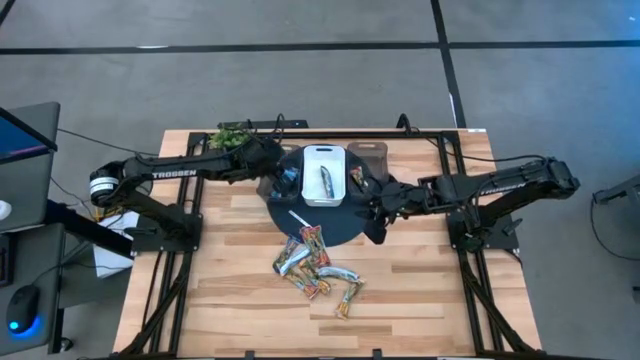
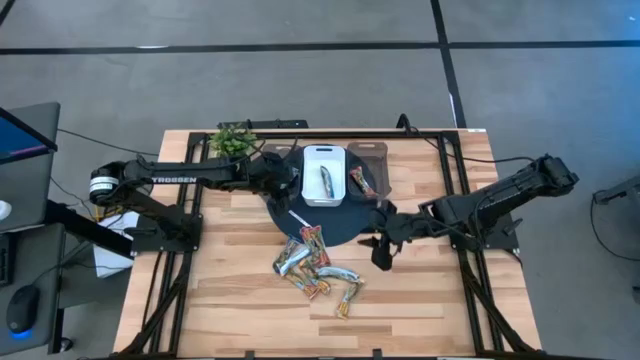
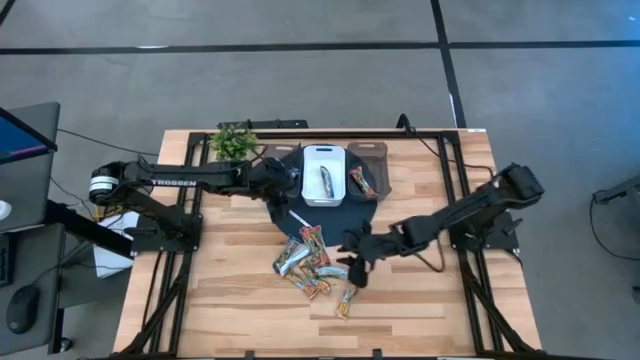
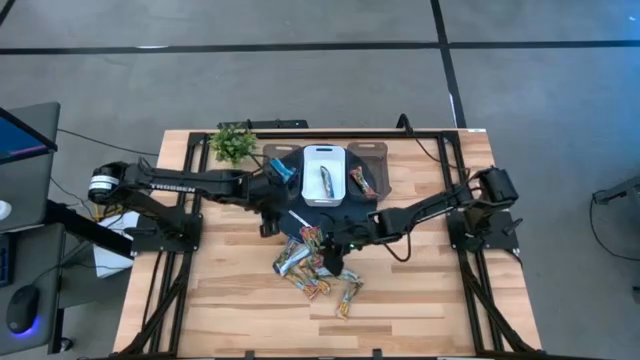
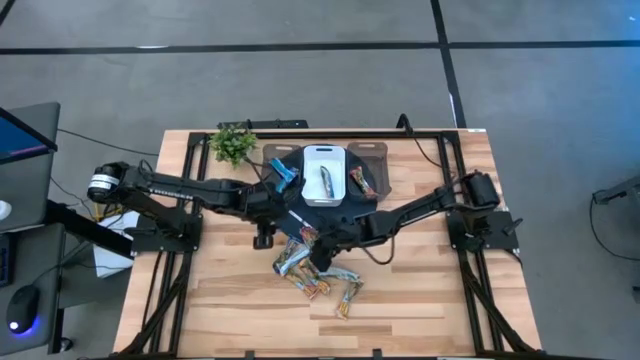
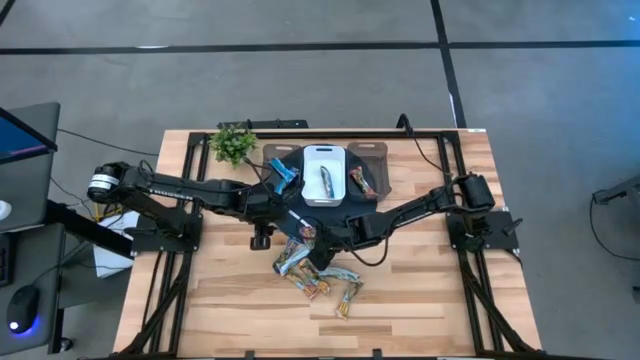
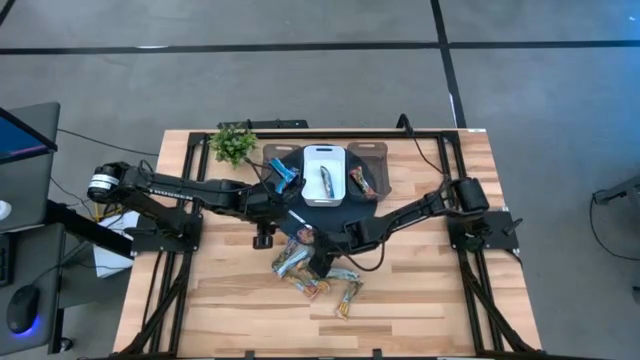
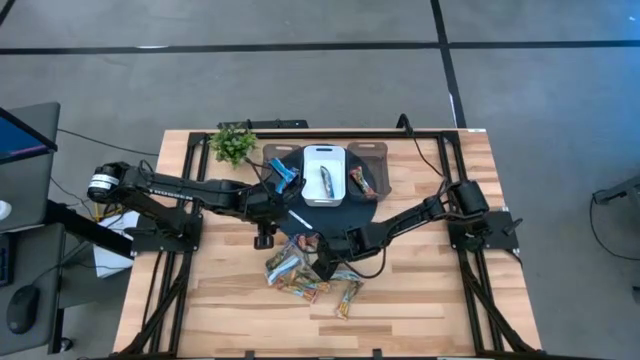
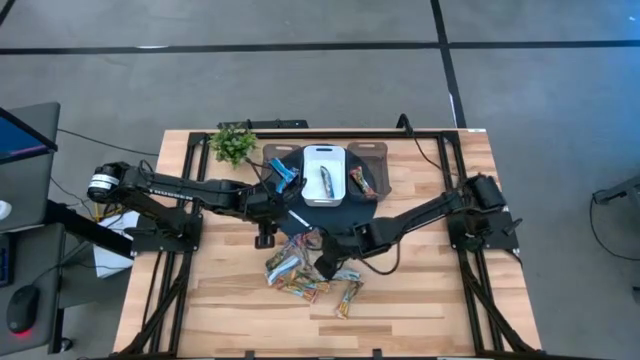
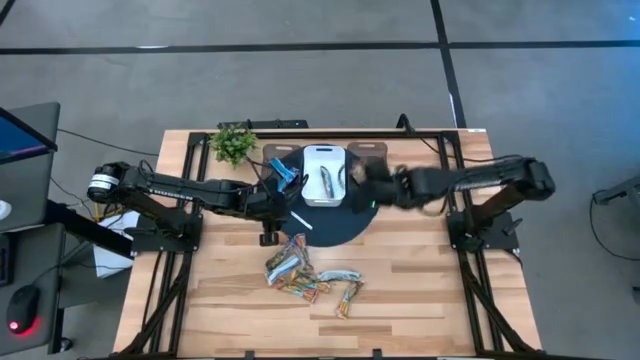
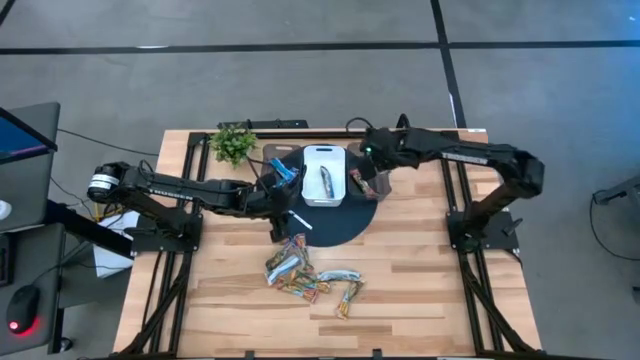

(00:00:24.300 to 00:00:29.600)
Task: Pick and place Granola Bars by type
Put the red granola bar into the right black bin

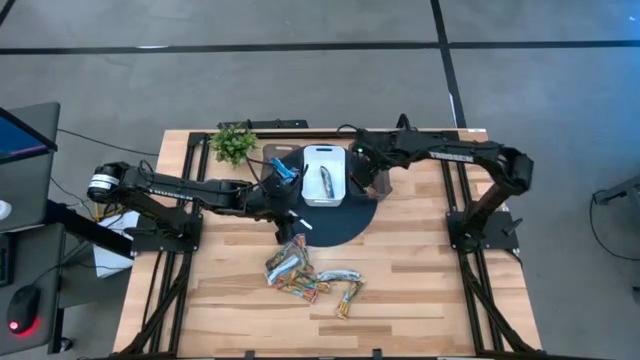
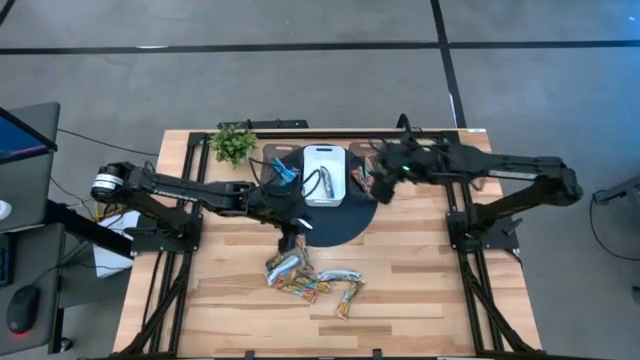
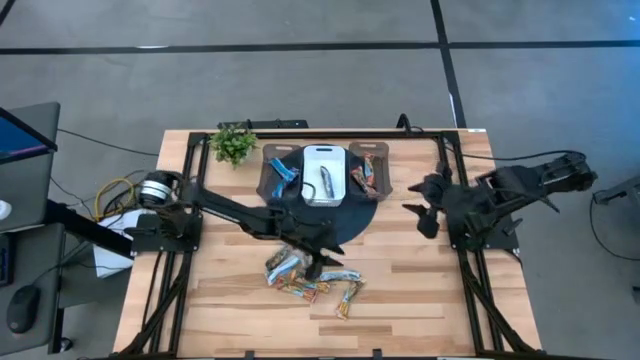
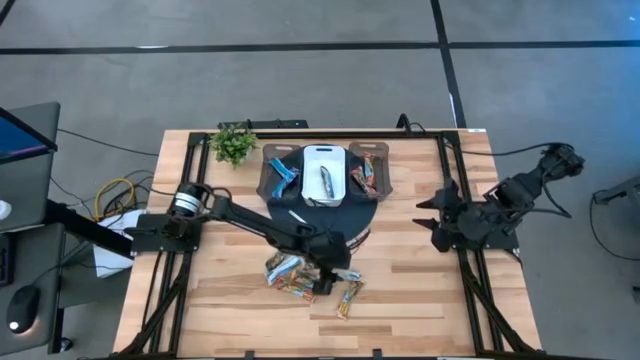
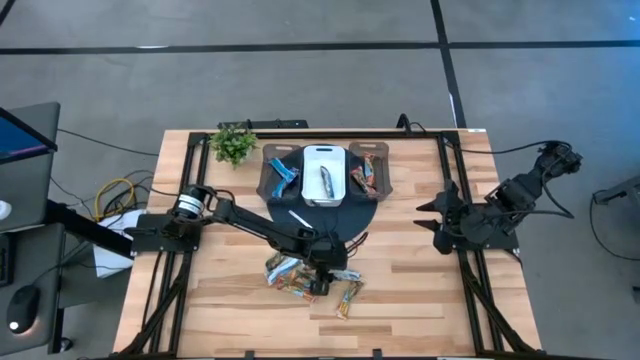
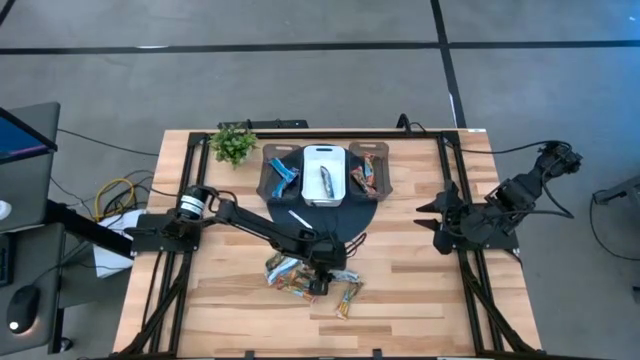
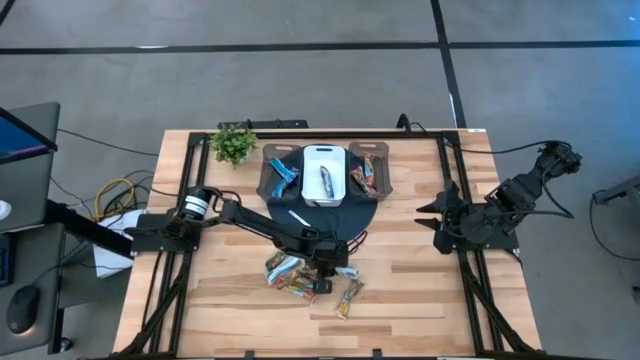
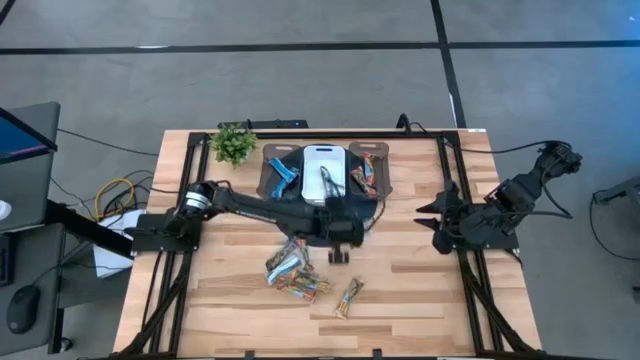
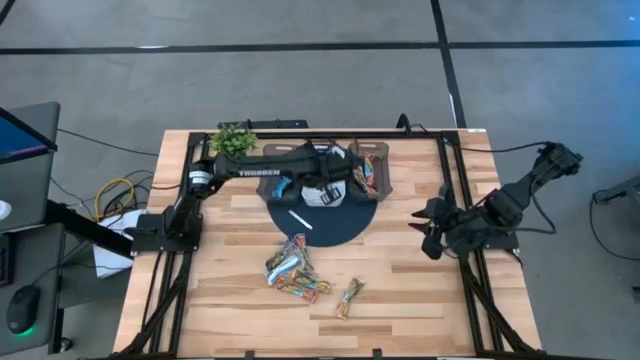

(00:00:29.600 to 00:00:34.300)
Put the orange granola bar into the white bin

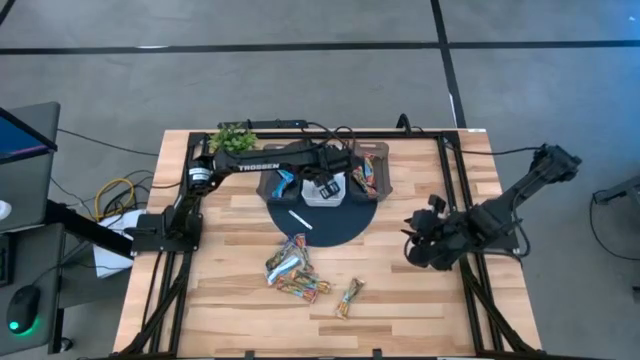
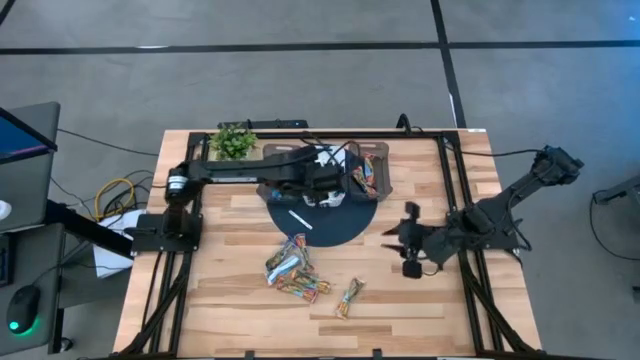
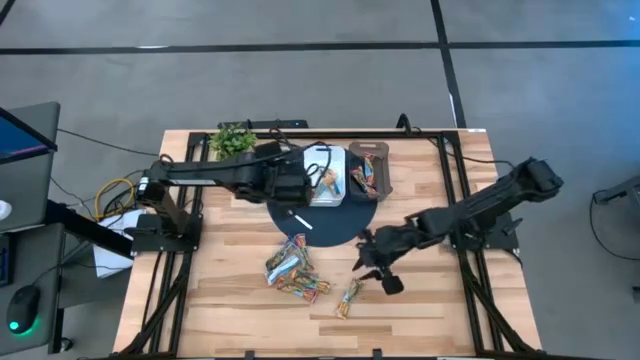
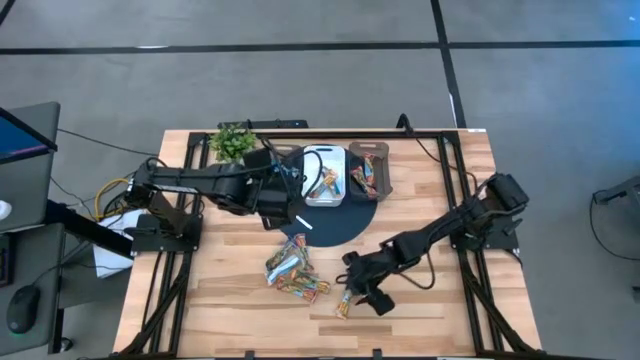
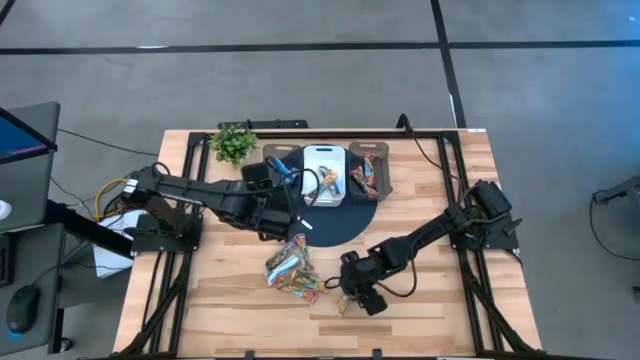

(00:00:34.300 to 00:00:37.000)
Put the orange granola bar into the white bin

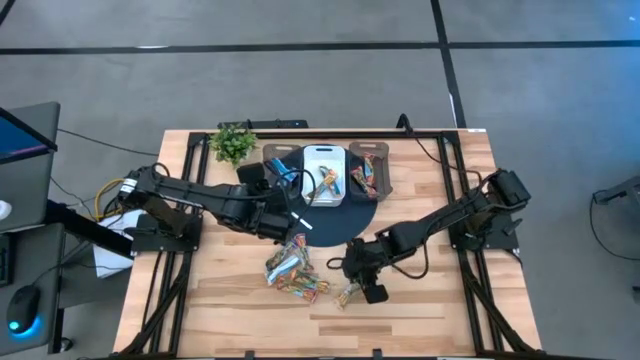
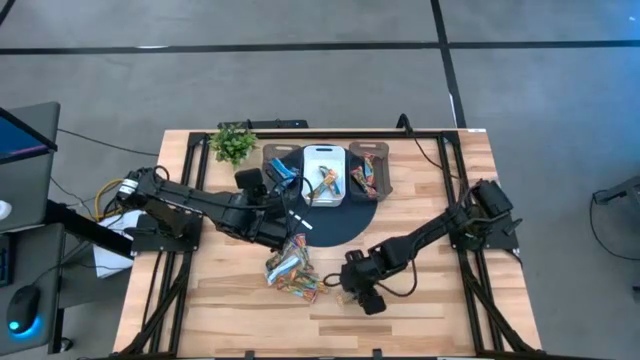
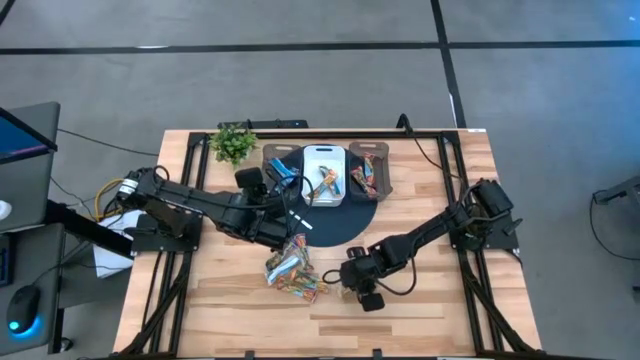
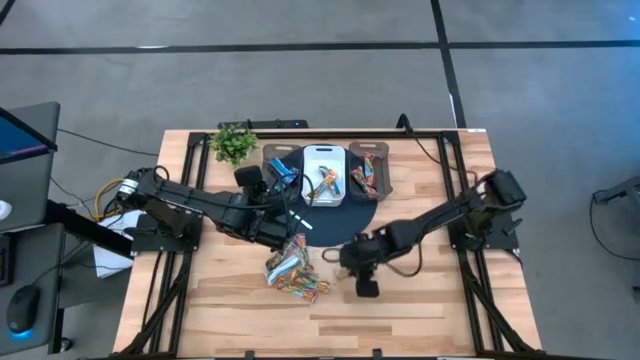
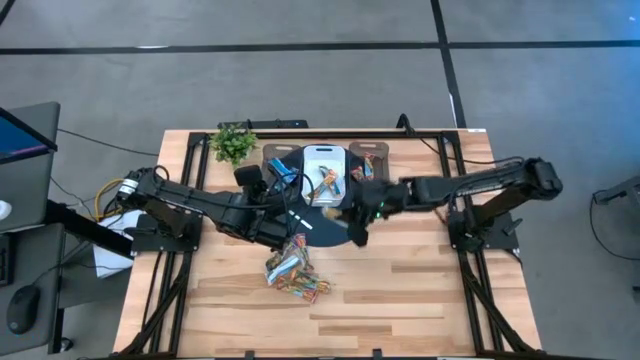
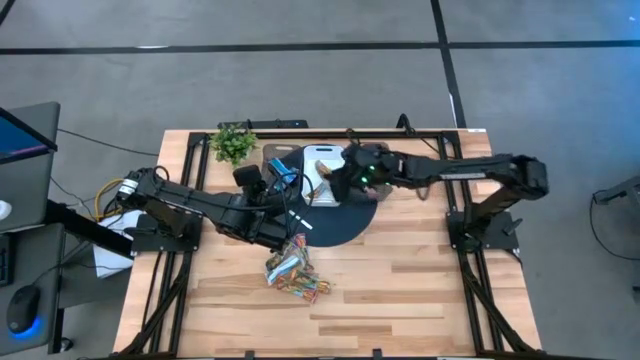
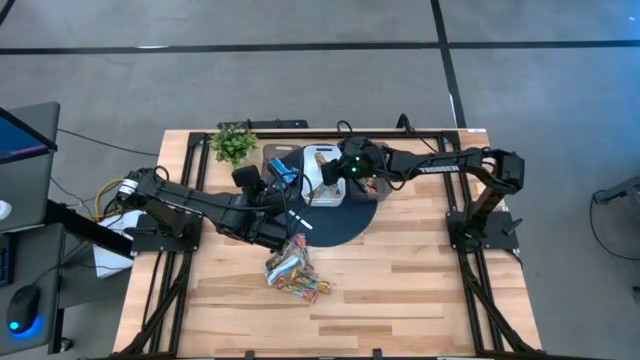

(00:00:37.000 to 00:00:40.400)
Put the orange granola bar into the white bin

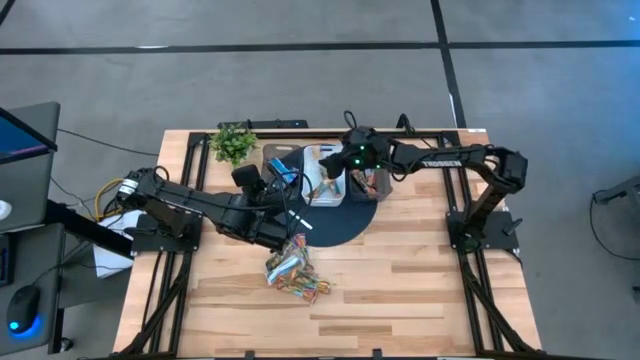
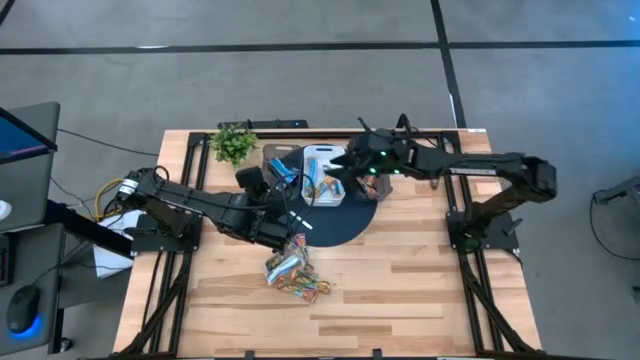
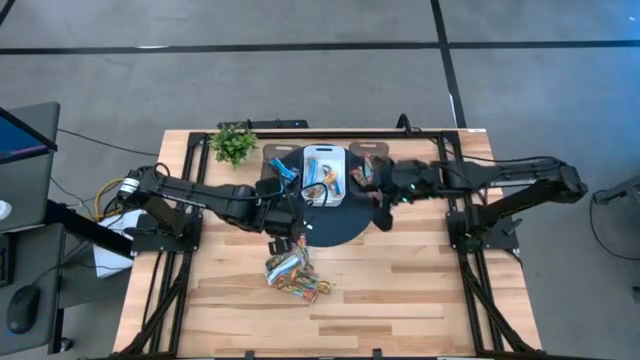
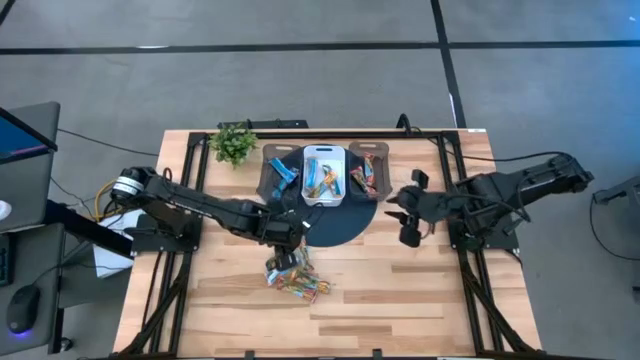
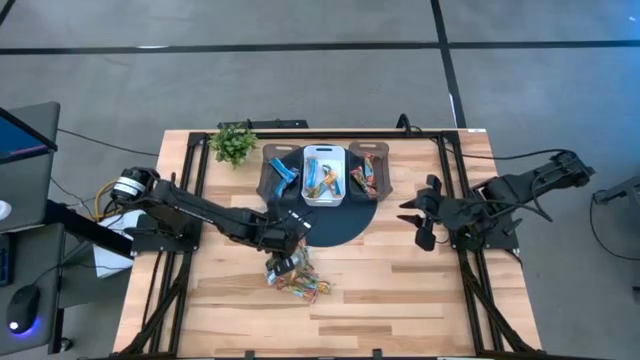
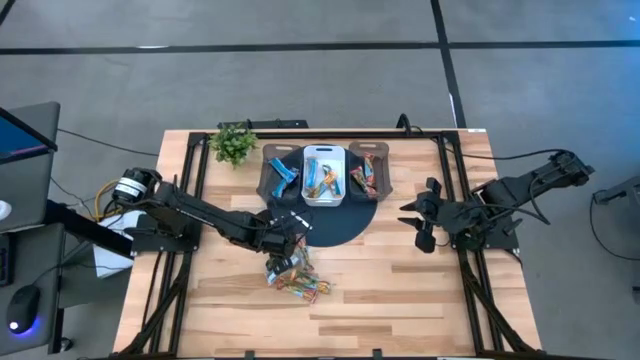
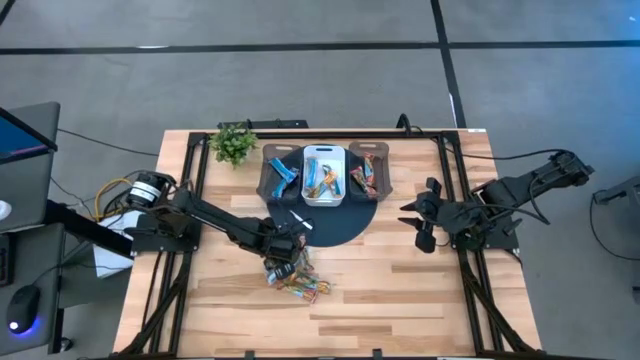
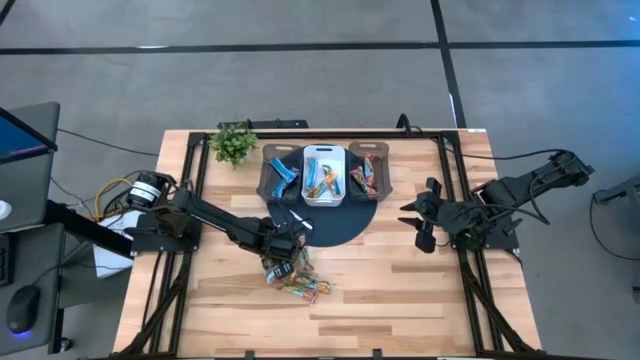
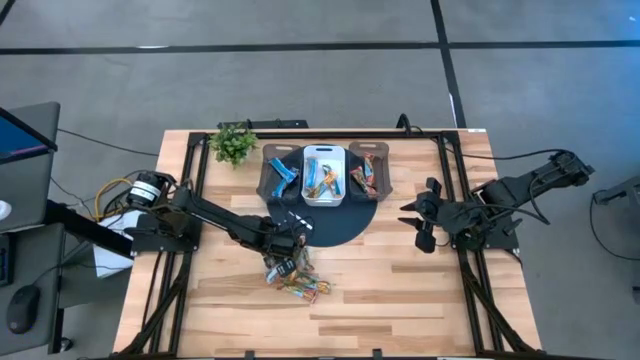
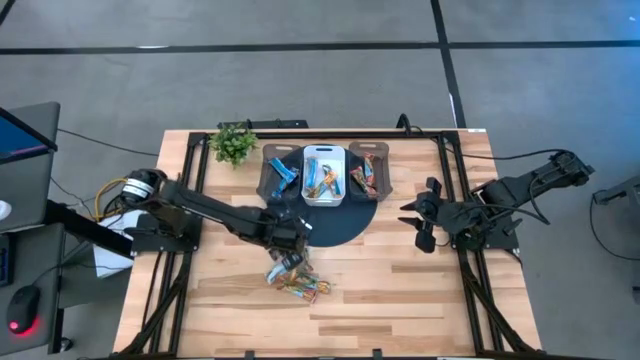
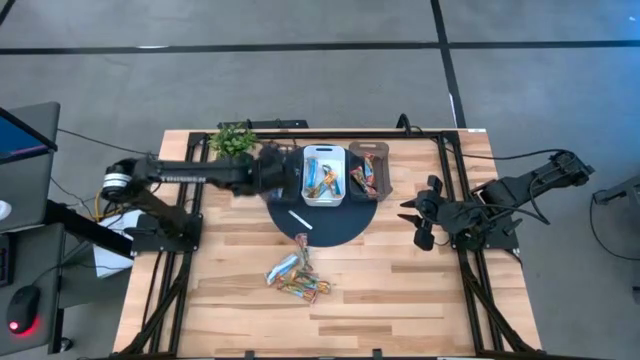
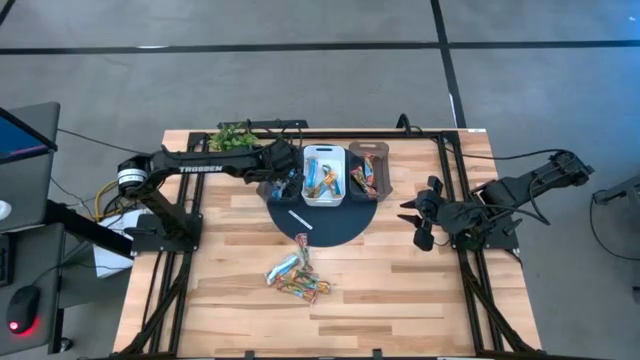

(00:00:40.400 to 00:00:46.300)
Put the blue granola bar into the left black bin
